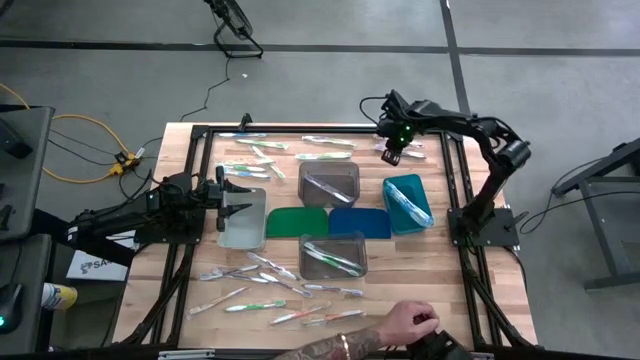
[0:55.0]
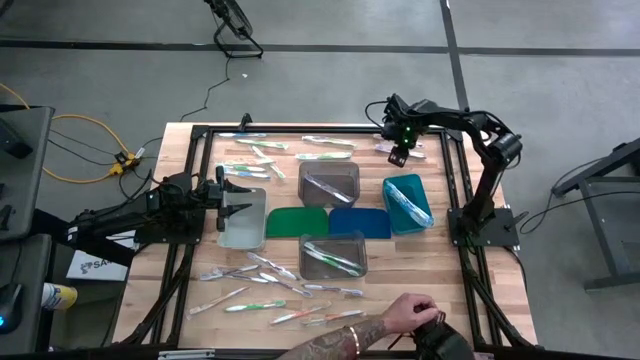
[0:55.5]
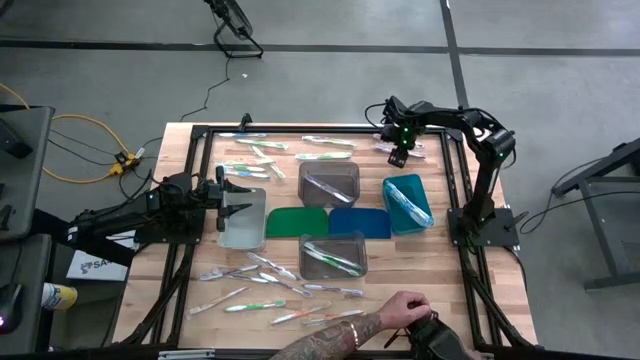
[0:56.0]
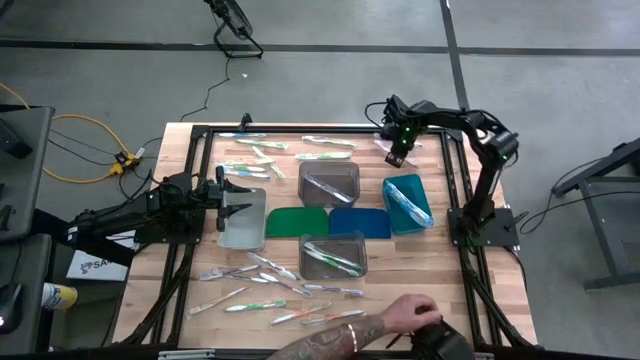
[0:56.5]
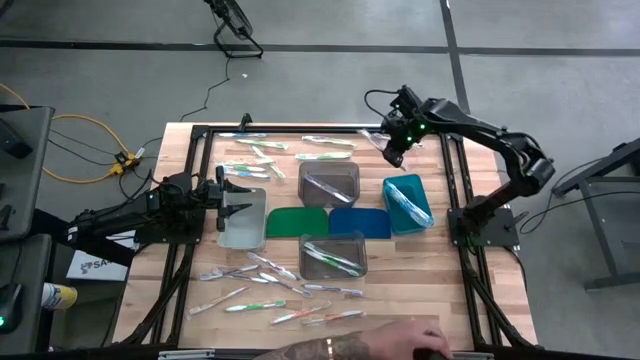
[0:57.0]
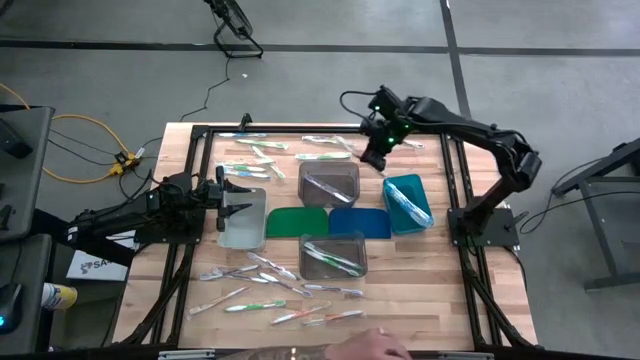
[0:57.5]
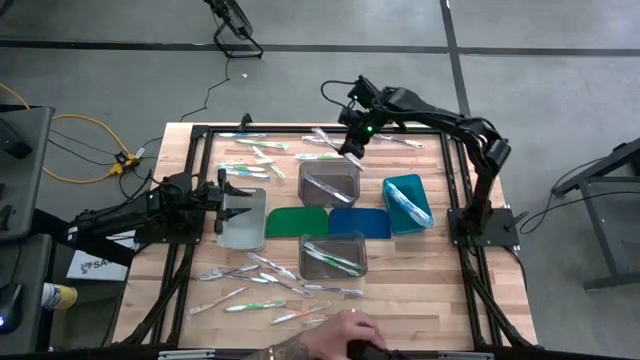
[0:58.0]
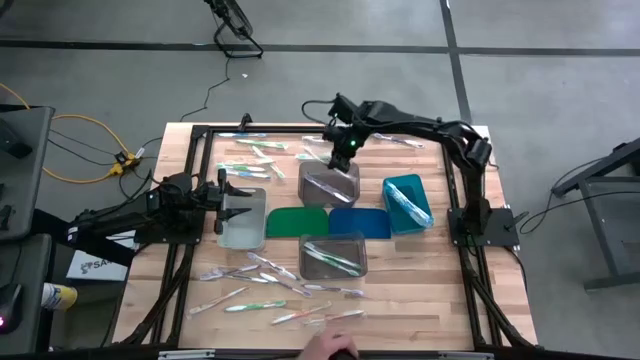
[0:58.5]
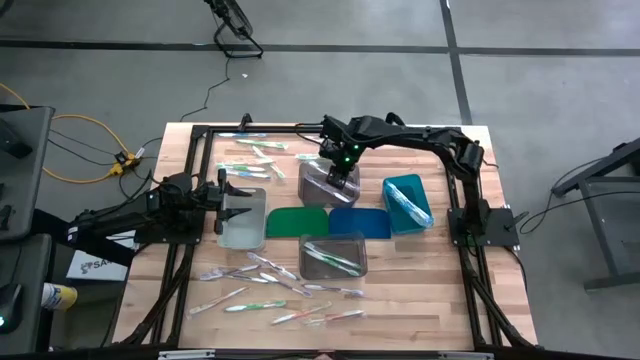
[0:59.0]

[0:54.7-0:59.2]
Task: Pick & Place Toothbrushes
Put the purple toothbrush into the top black bin

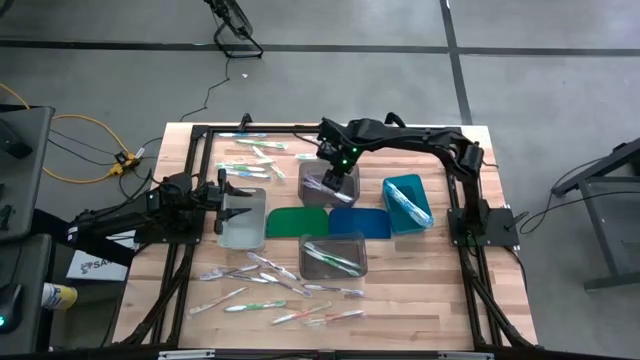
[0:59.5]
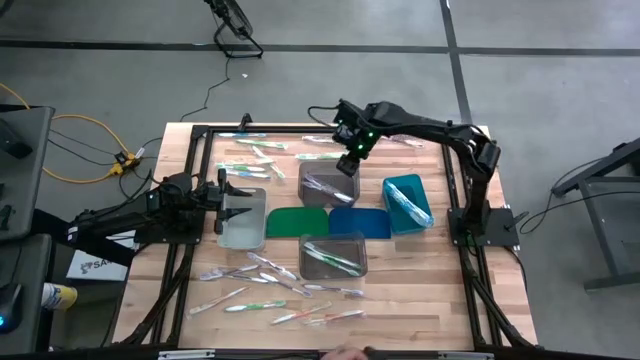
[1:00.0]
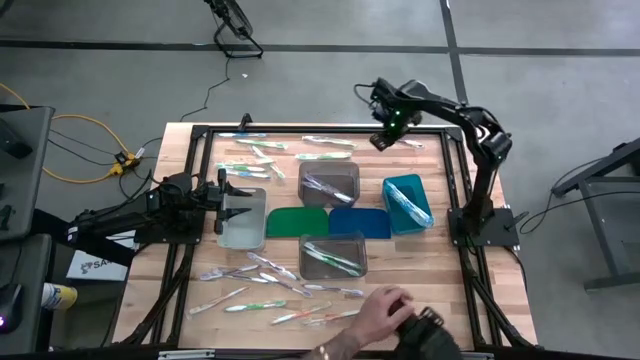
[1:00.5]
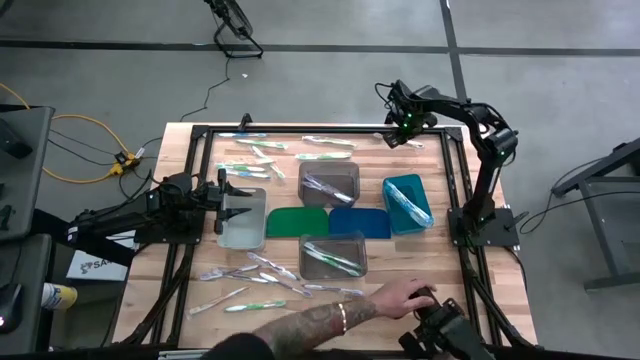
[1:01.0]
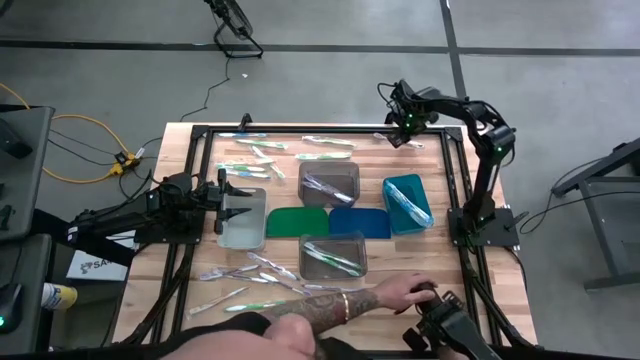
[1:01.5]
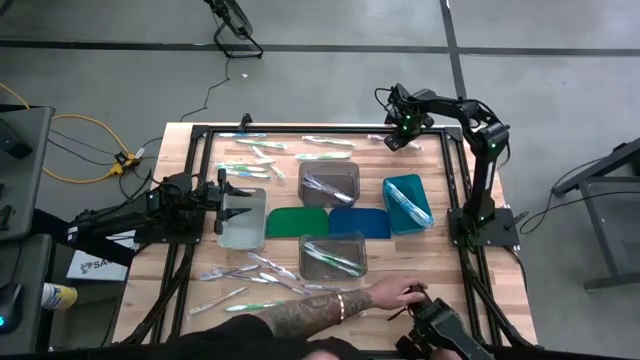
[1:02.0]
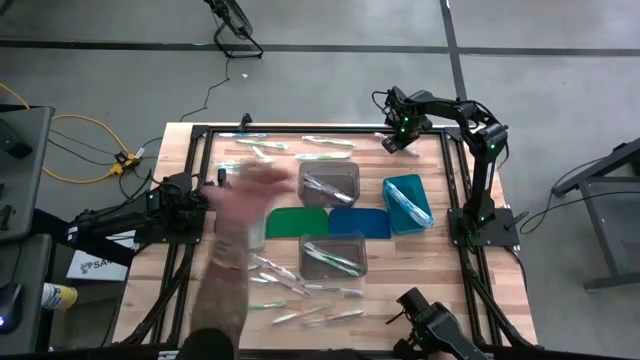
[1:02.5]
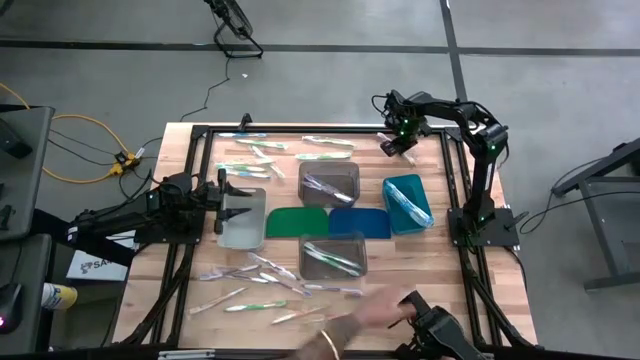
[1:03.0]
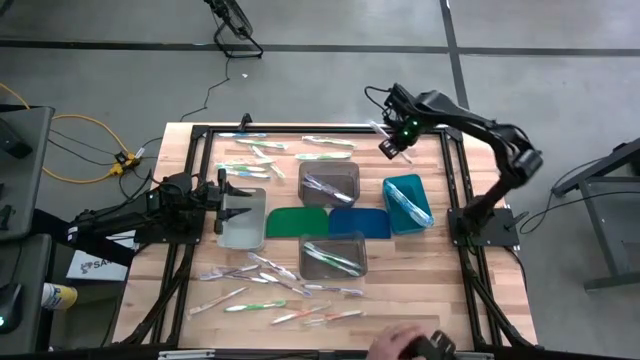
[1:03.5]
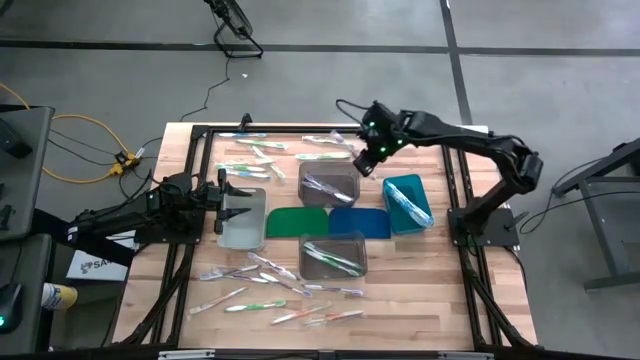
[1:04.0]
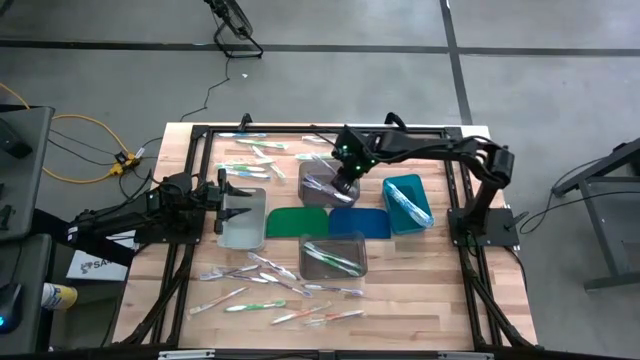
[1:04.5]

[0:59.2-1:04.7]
Put the purple toothbrush into the top black bin

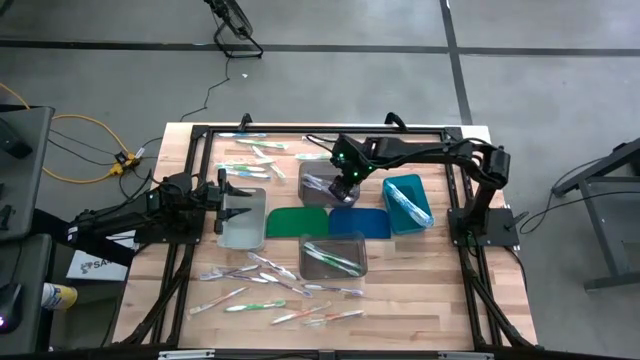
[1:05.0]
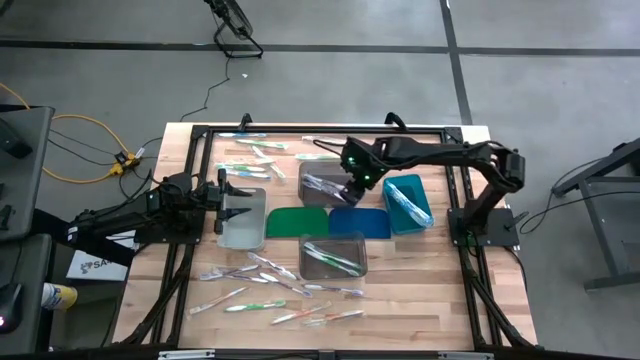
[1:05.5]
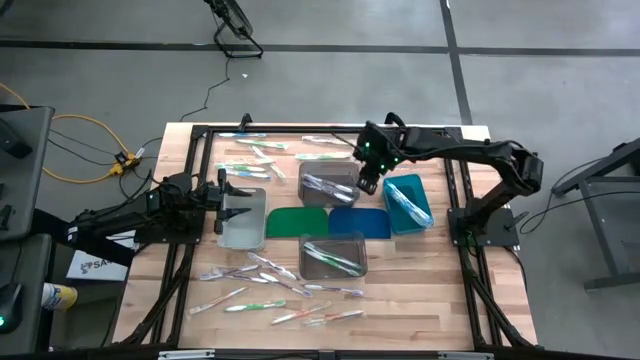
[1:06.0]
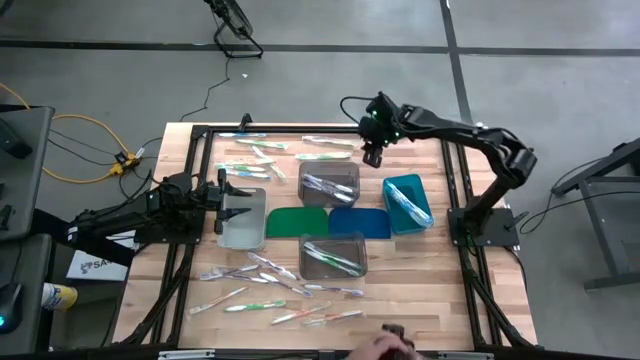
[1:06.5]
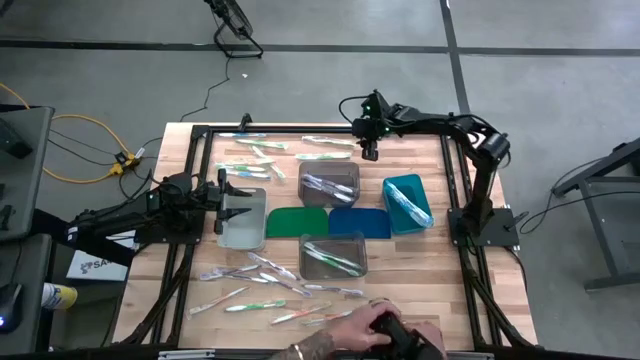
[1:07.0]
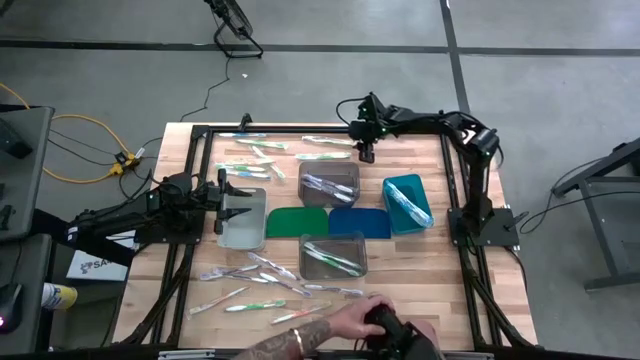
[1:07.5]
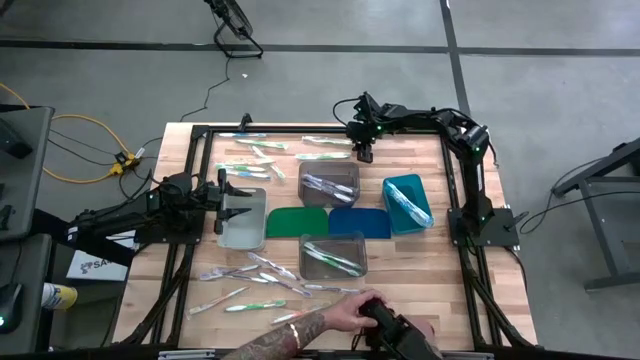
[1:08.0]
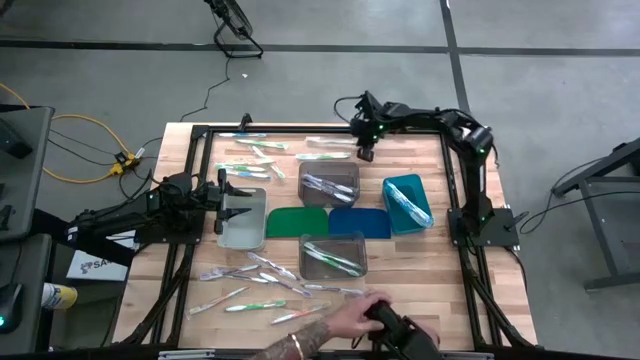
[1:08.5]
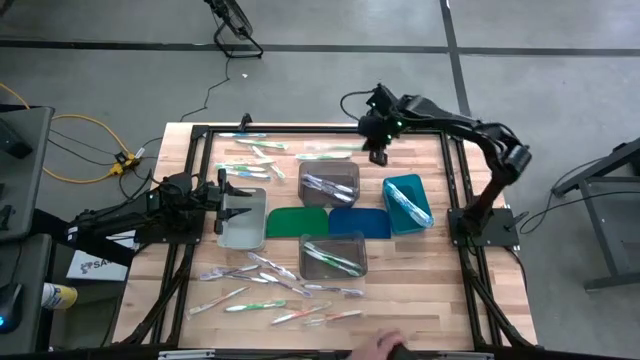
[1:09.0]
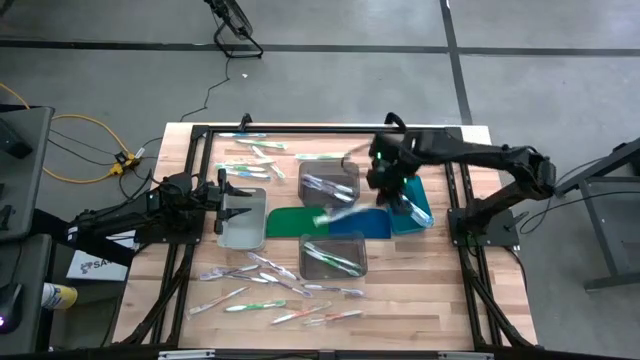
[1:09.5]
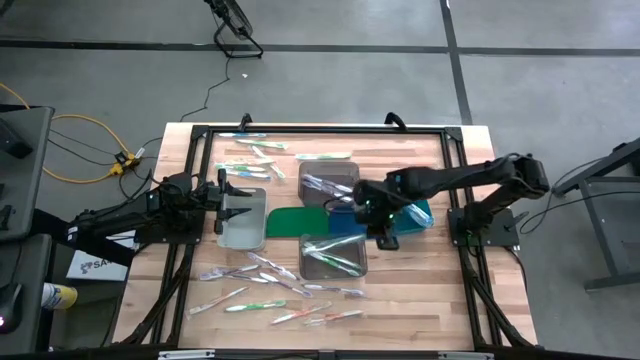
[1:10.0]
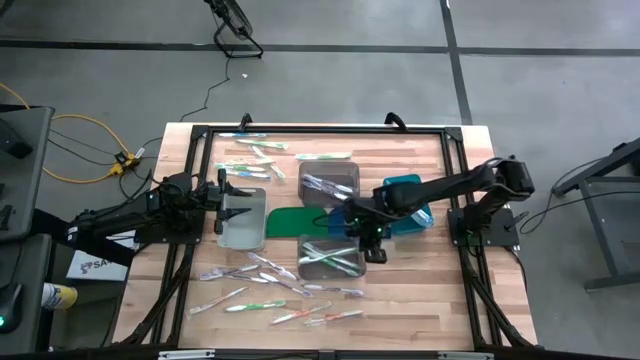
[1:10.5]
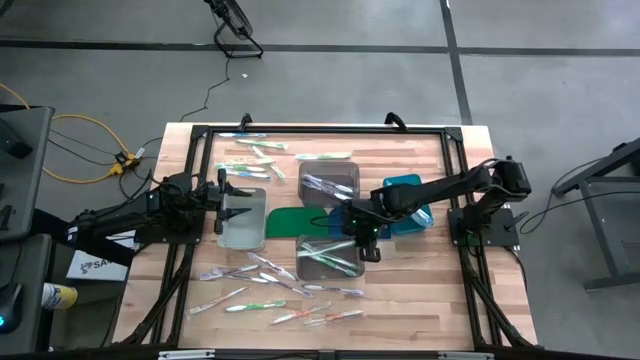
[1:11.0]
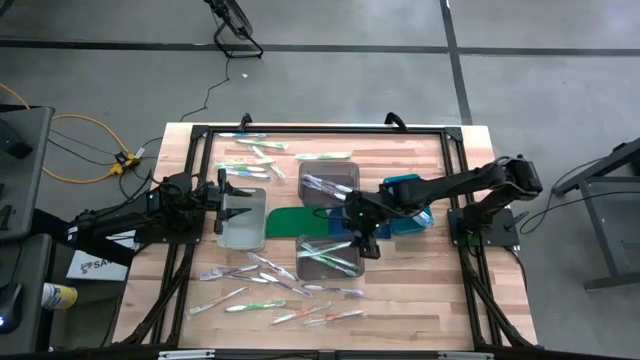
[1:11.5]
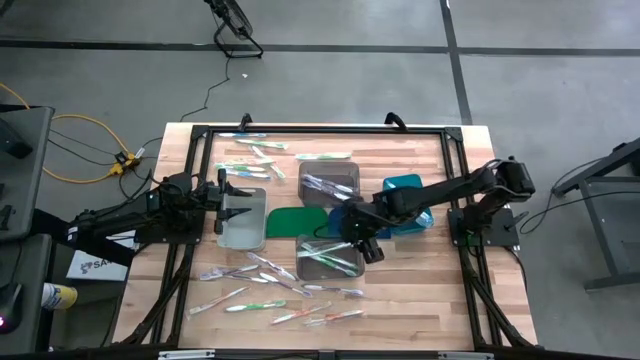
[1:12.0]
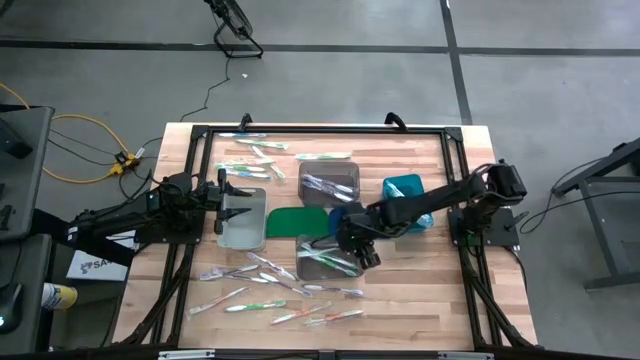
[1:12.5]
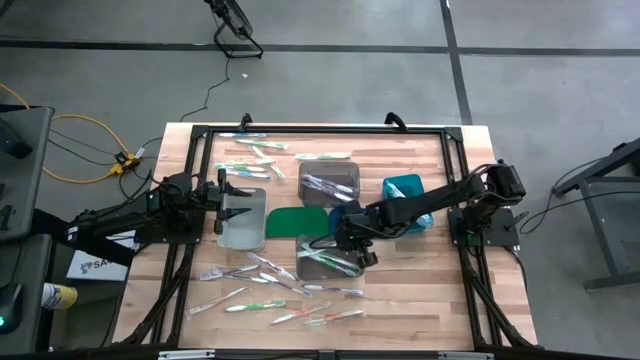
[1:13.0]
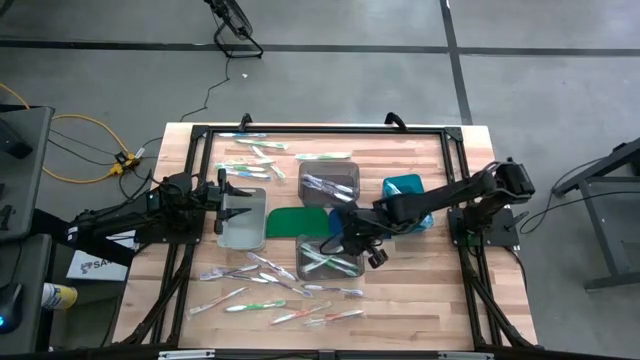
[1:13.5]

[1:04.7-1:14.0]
Put the green toothbrush into the bottom black bin

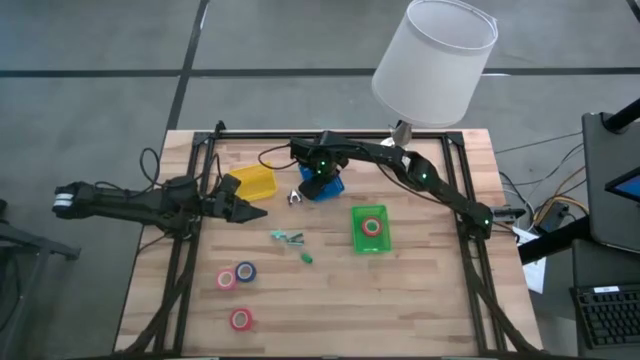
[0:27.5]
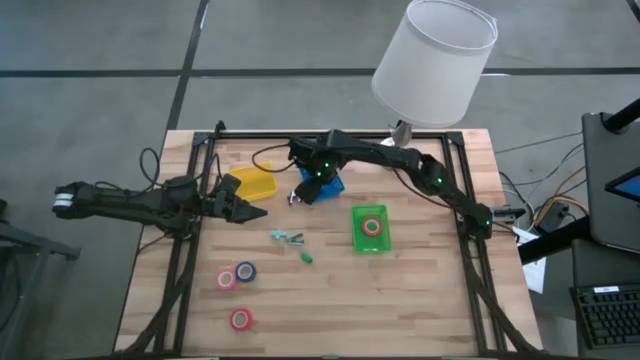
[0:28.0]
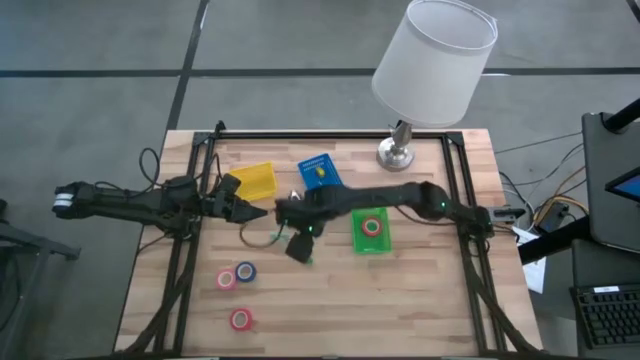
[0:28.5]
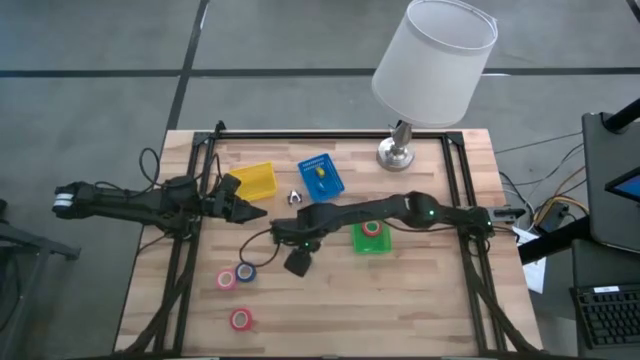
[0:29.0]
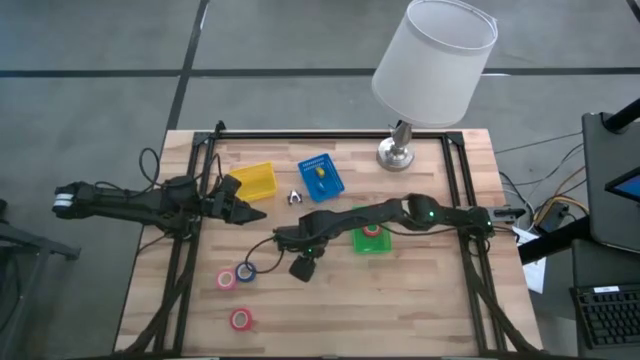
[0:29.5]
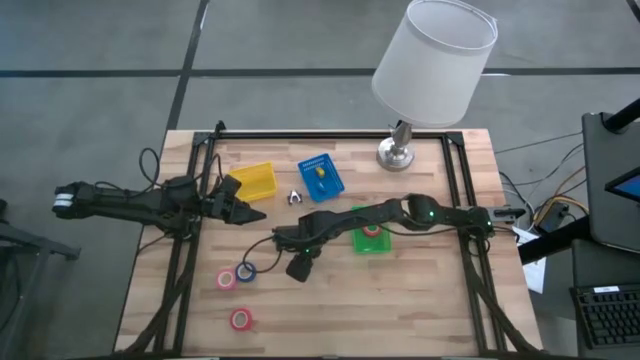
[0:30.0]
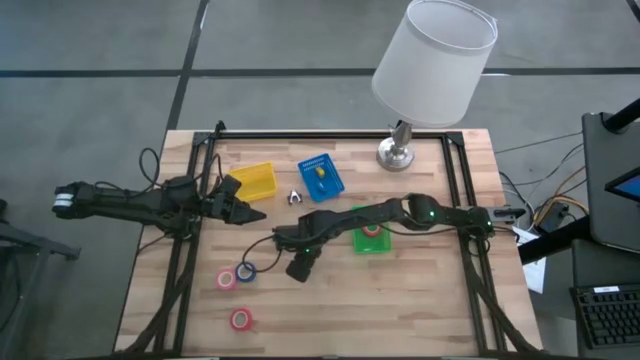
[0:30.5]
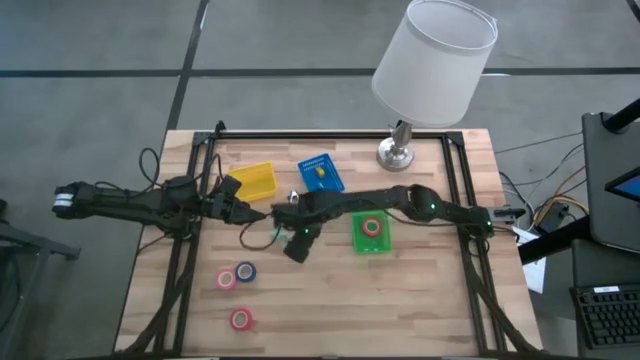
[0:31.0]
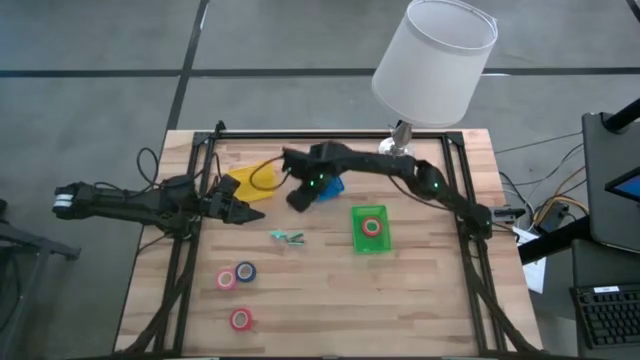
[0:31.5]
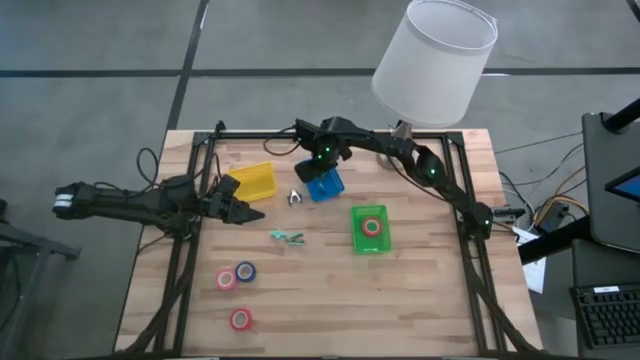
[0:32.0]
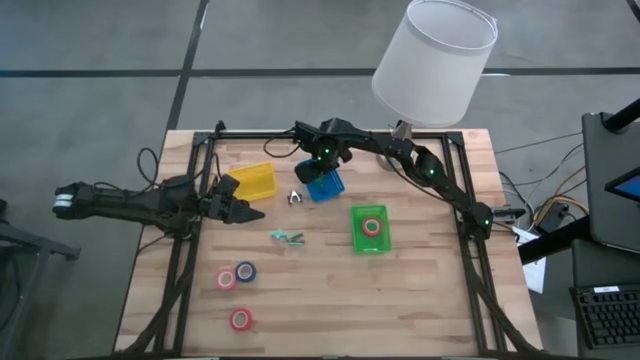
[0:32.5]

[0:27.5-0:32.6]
Task: Pick and place Stapler, Stapler remover, tape
Put the green stapler into the blue bin
